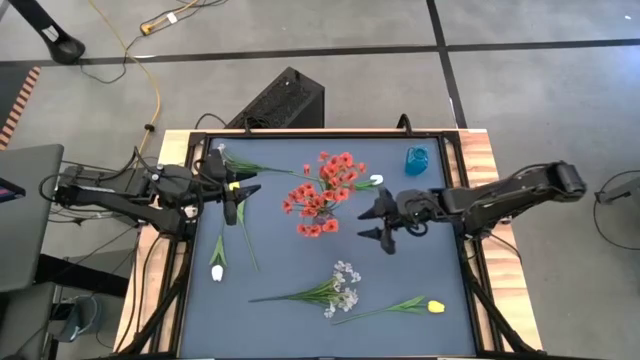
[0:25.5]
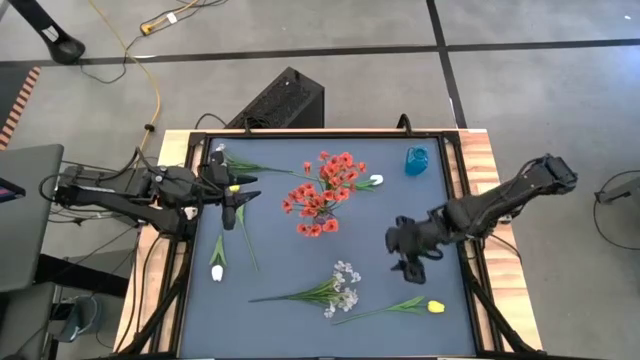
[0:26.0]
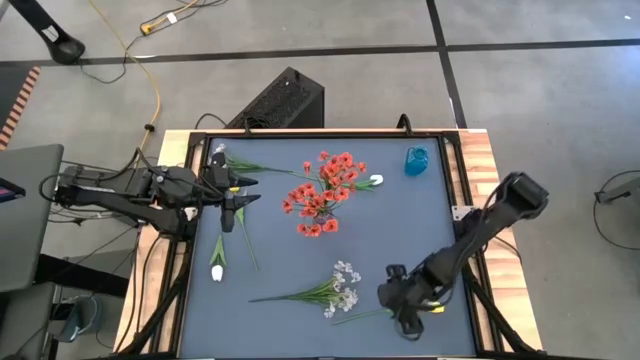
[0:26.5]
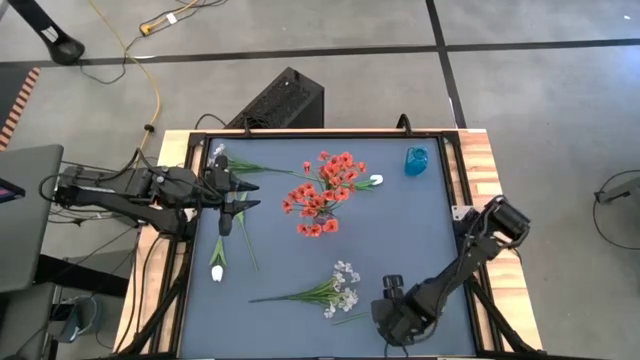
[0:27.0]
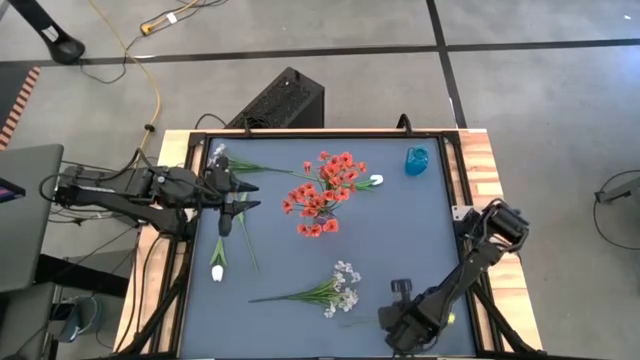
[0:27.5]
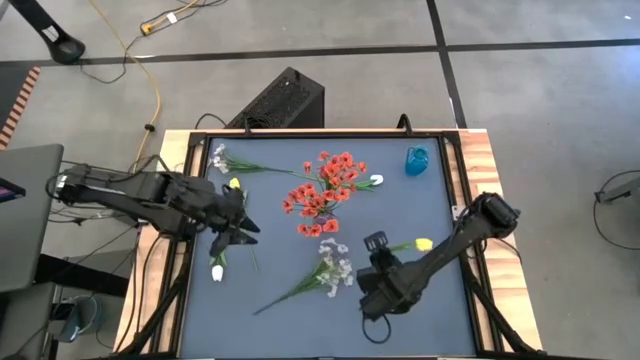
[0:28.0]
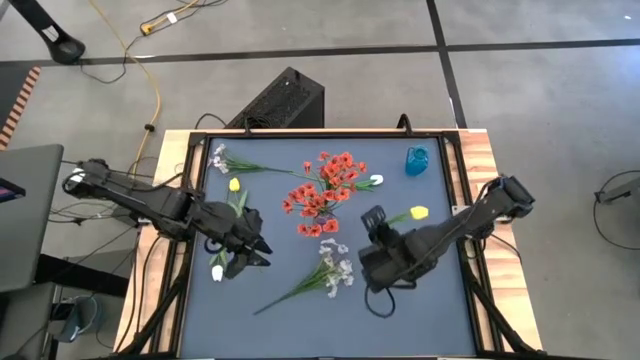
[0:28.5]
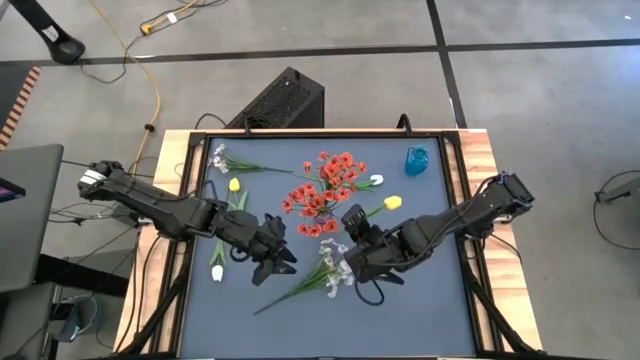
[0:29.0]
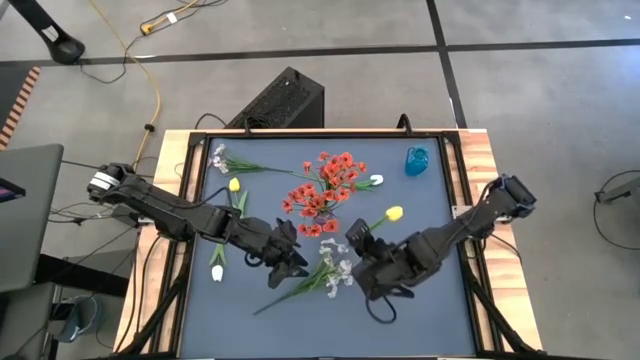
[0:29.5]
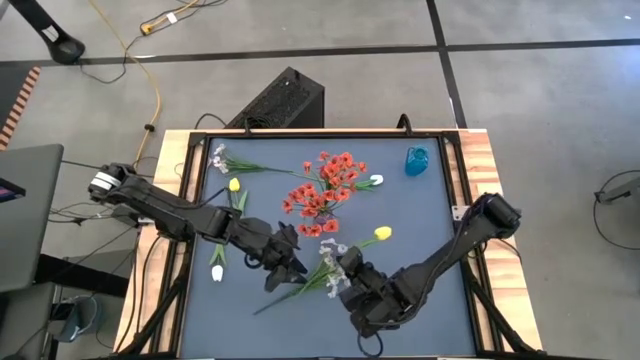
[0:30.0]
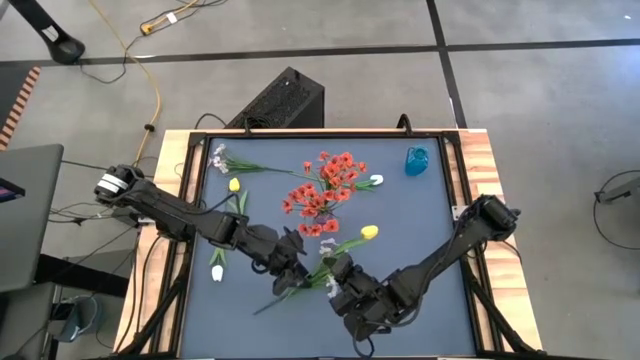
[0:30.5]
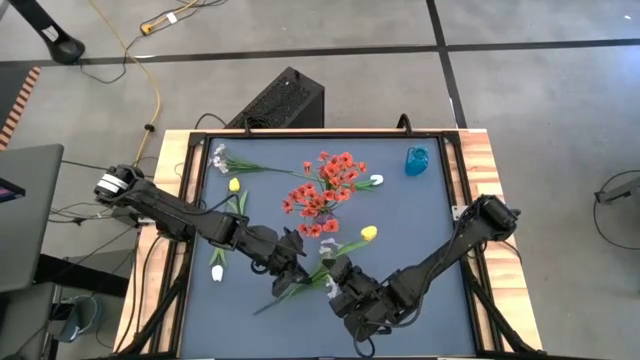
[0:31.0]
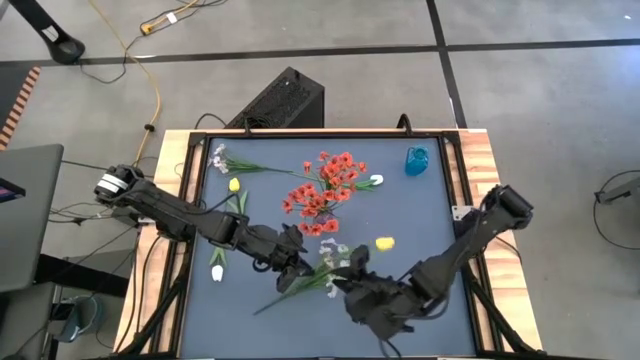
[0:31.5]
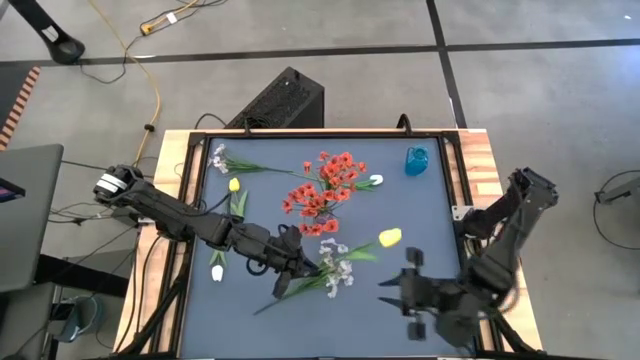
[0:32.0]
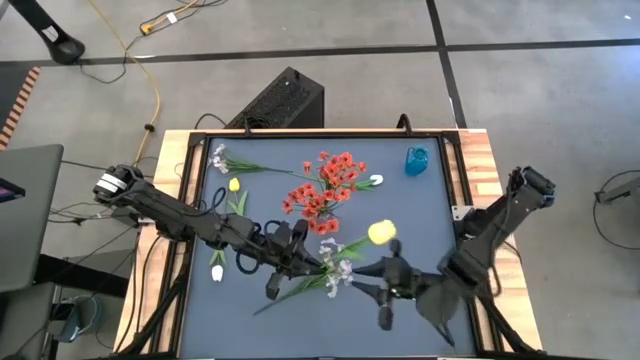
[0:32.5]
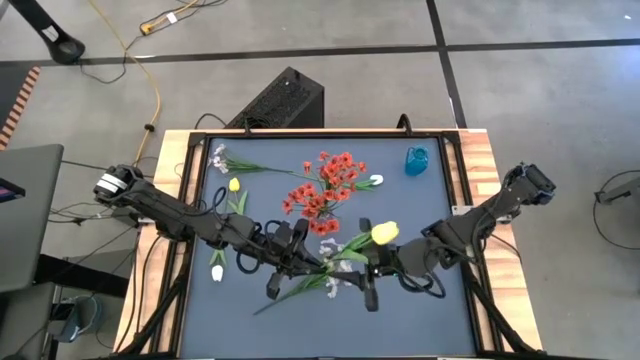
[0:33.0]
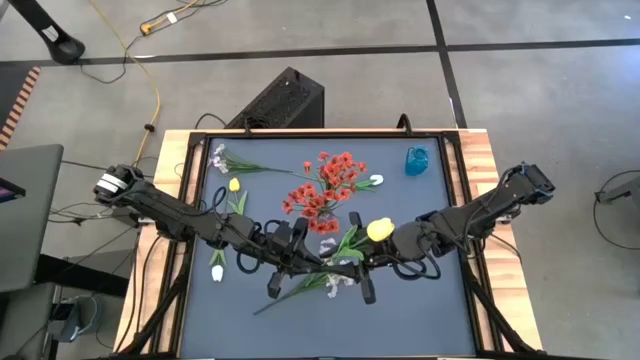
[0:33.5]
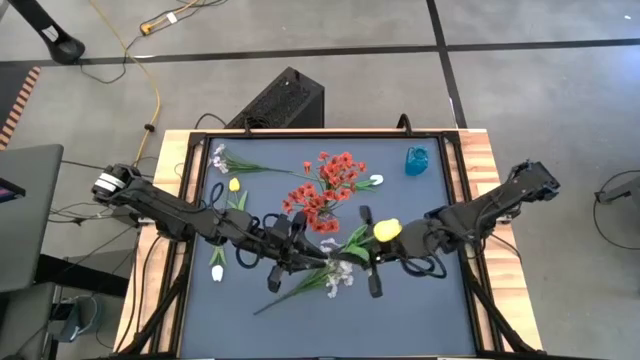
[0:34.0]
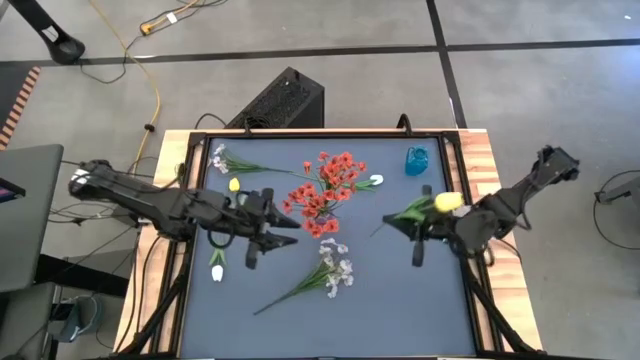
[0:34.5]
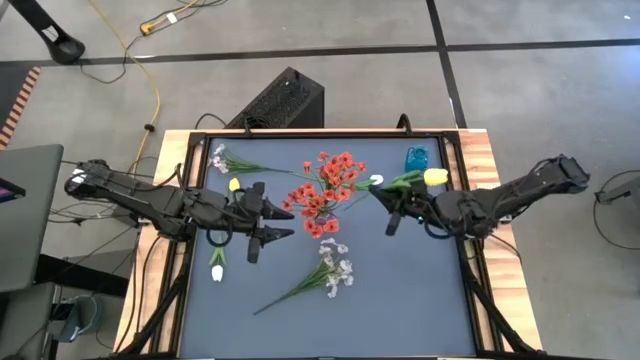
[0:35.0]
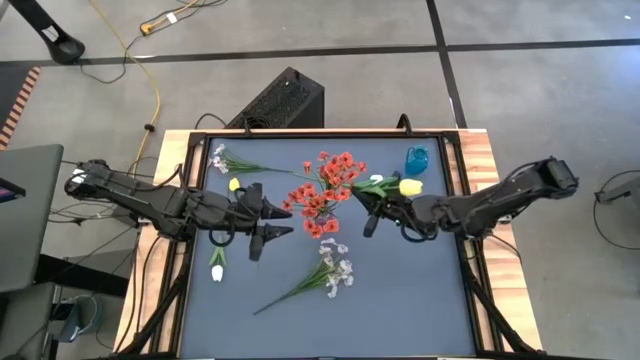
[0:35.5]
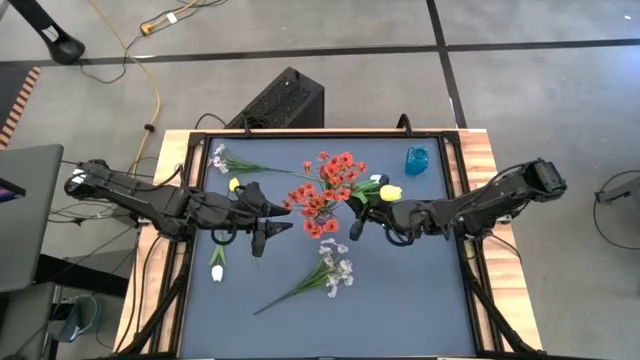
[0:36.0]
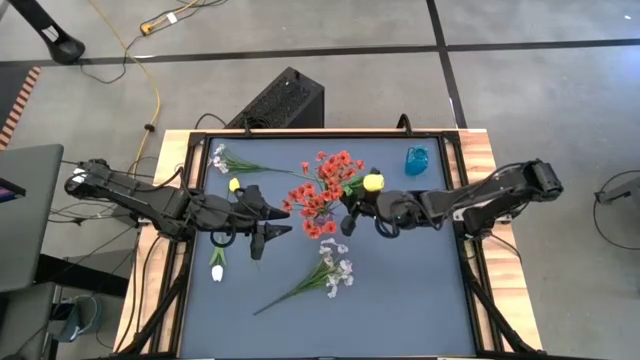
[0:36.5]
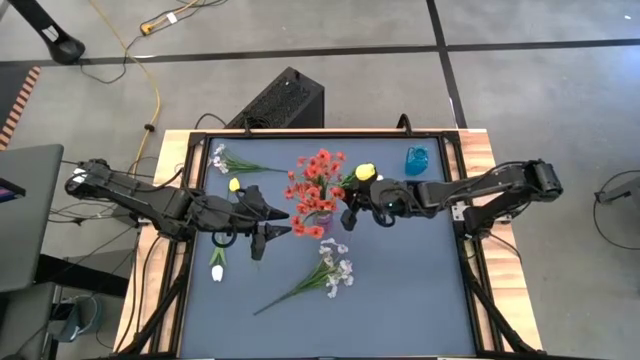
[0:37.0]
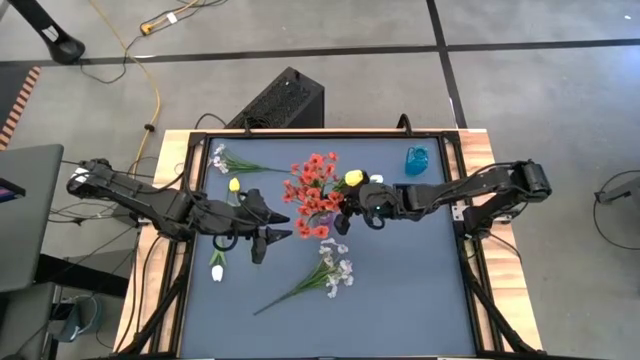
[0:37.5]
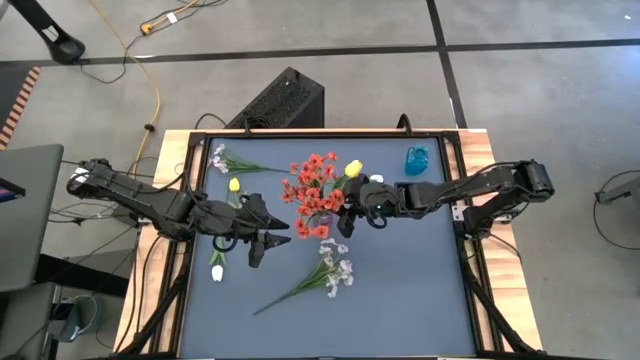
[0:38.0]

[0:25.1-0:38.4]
Task: Sort flowers into vase by color
Put the bottom yellow flower into the pink vase
